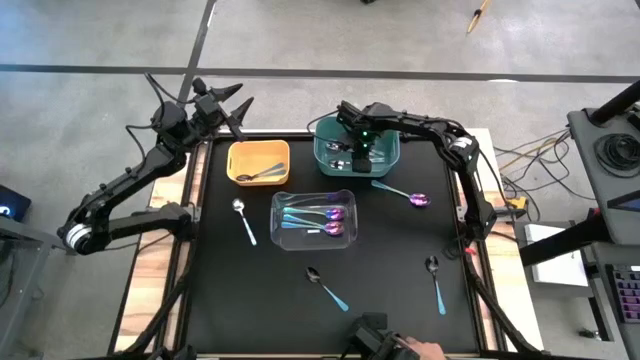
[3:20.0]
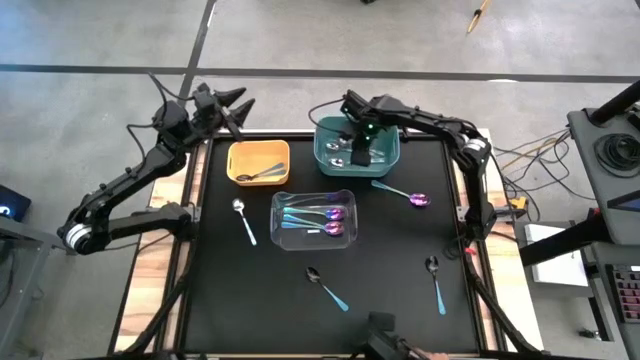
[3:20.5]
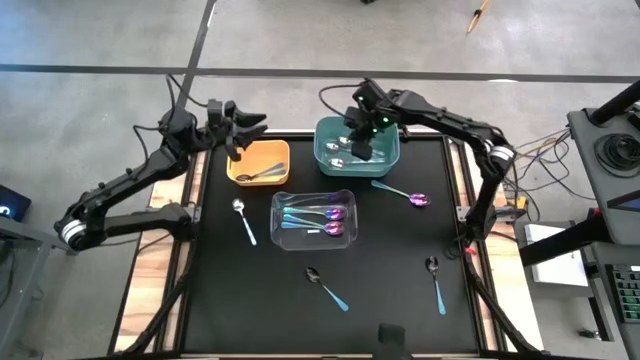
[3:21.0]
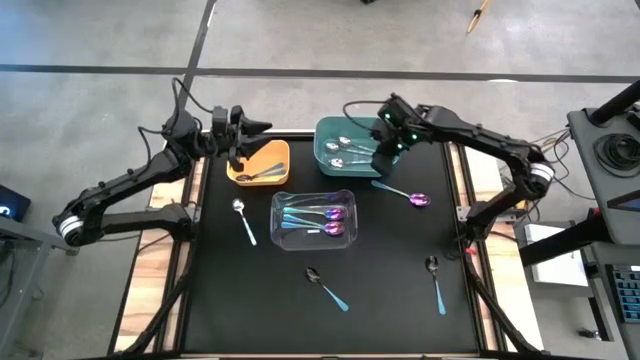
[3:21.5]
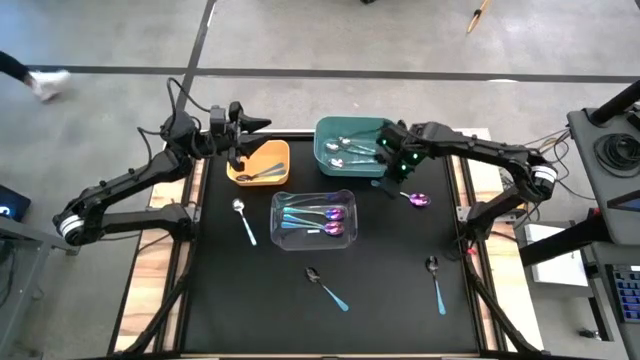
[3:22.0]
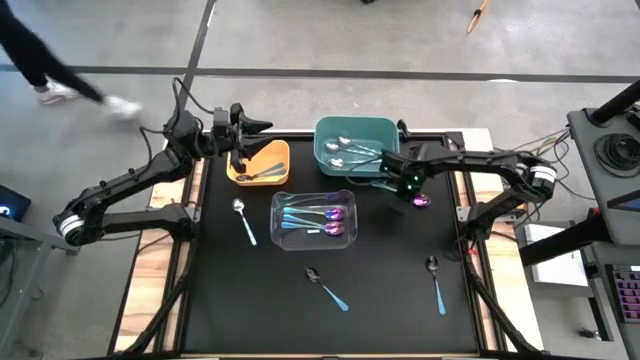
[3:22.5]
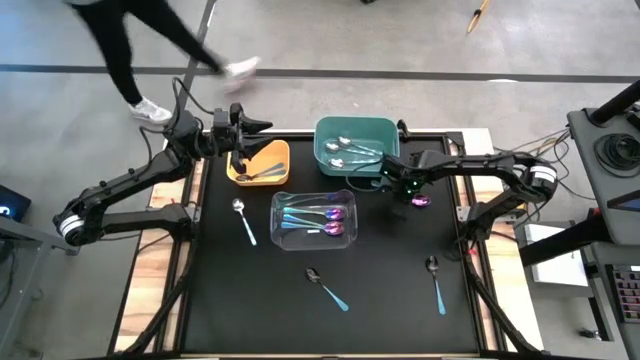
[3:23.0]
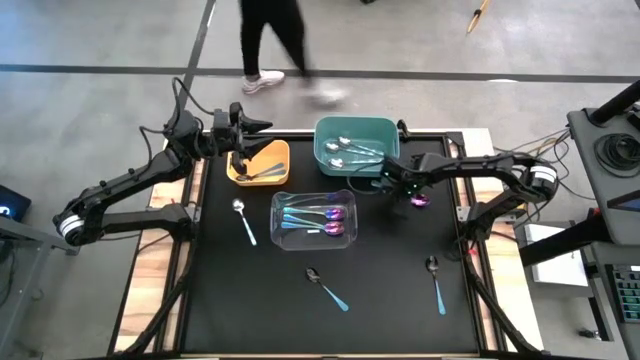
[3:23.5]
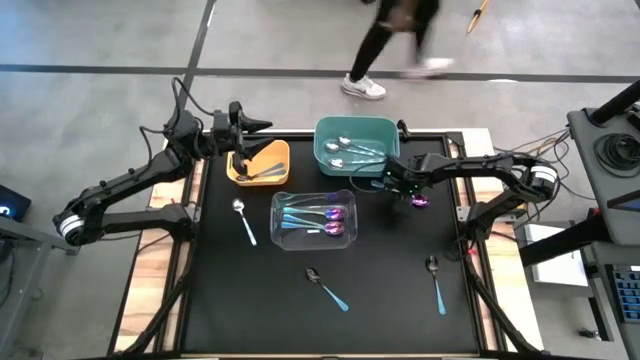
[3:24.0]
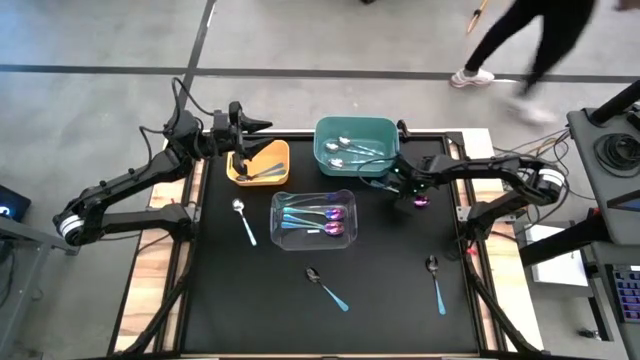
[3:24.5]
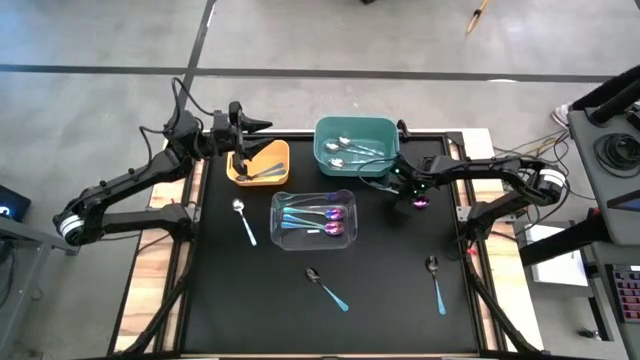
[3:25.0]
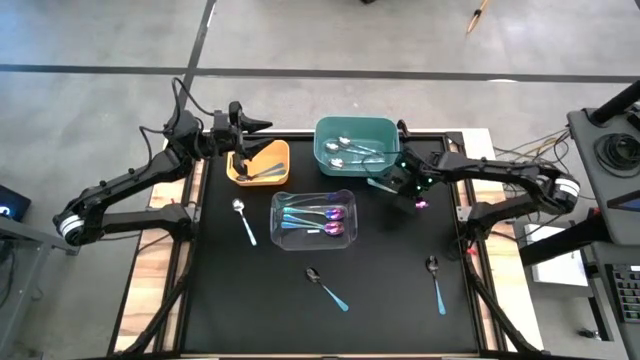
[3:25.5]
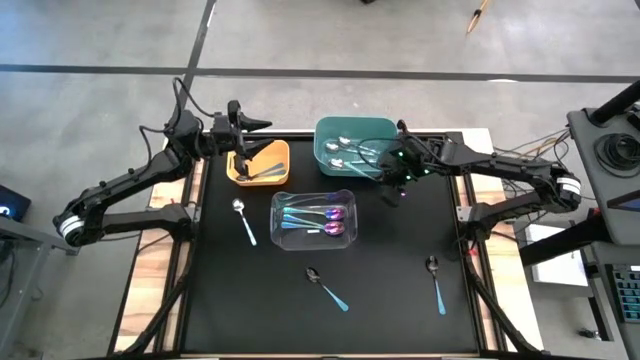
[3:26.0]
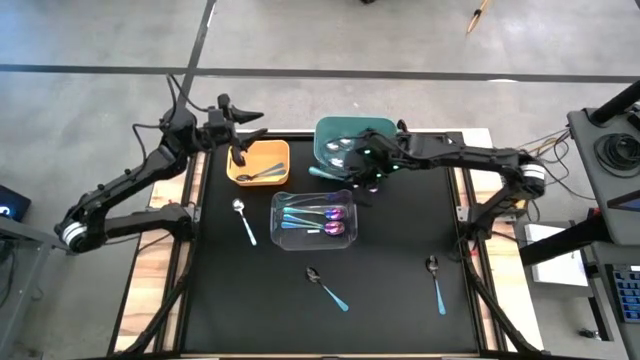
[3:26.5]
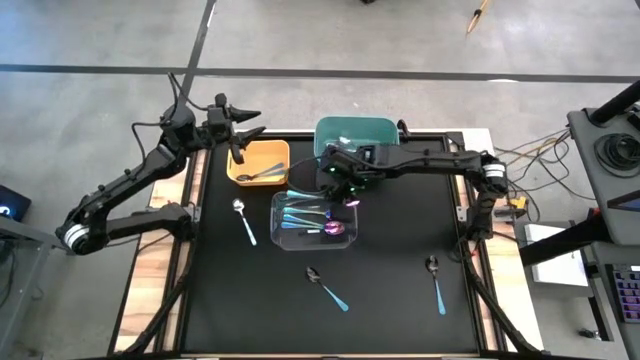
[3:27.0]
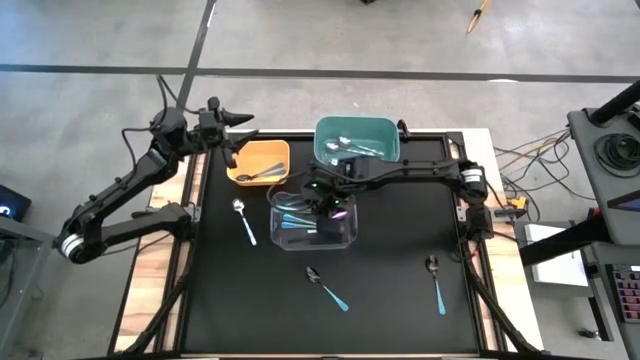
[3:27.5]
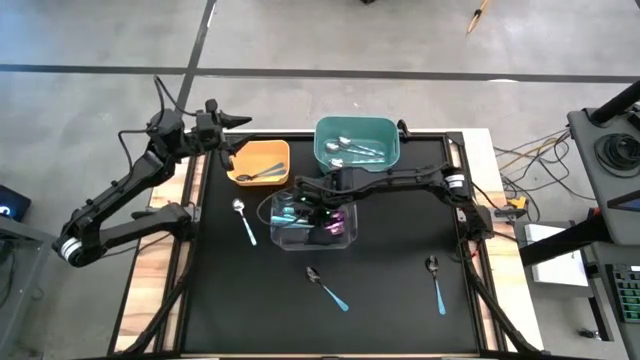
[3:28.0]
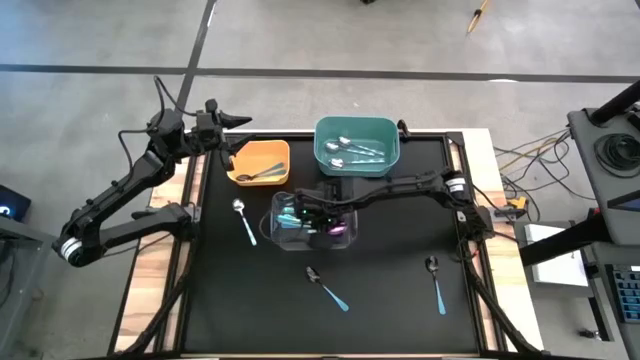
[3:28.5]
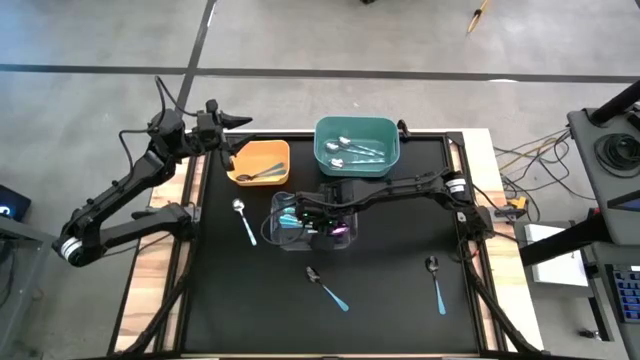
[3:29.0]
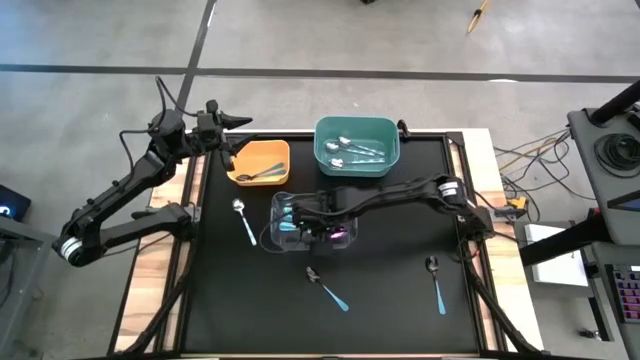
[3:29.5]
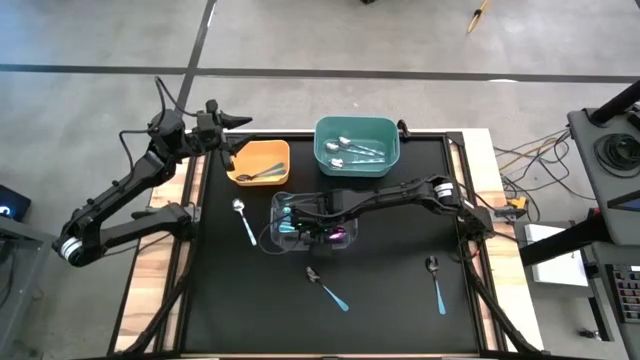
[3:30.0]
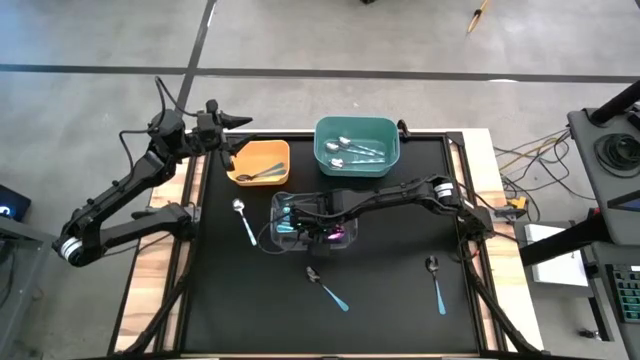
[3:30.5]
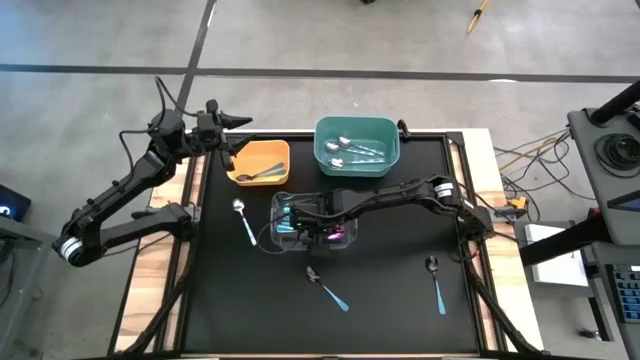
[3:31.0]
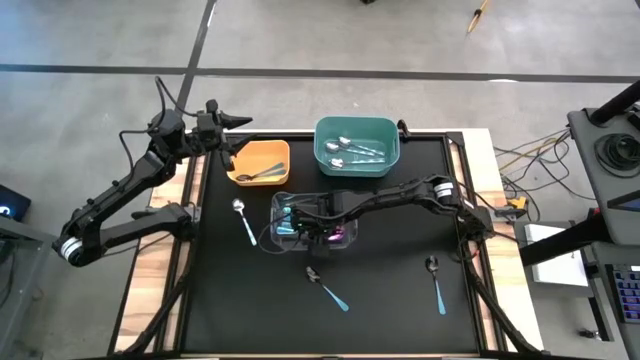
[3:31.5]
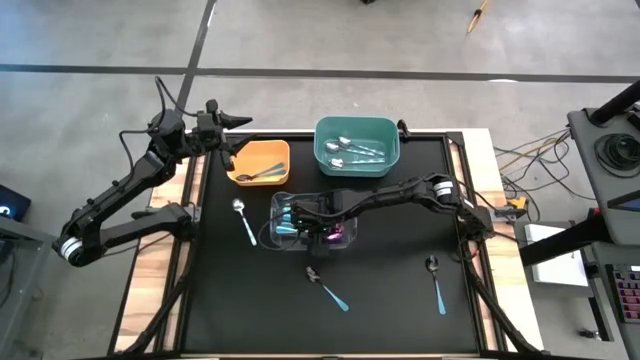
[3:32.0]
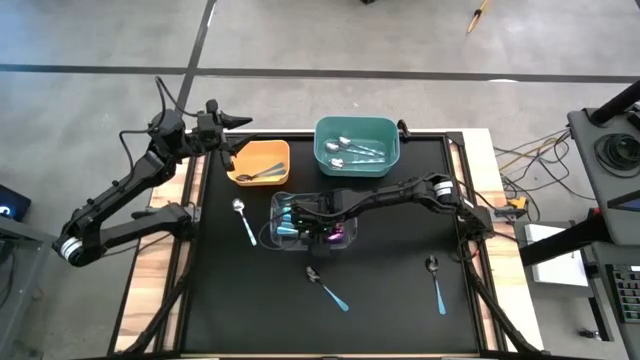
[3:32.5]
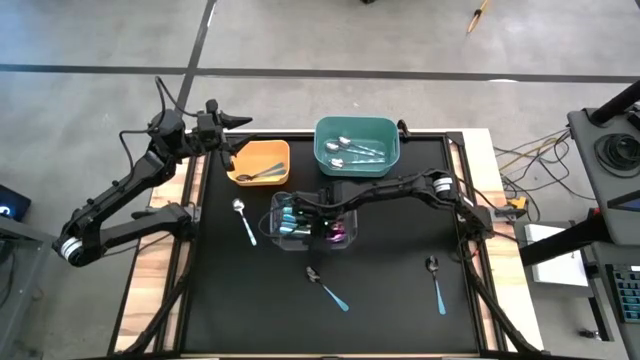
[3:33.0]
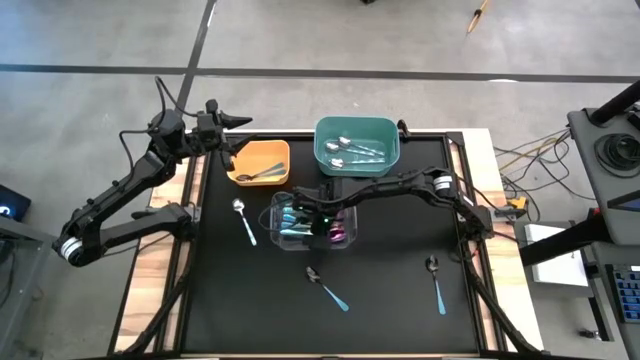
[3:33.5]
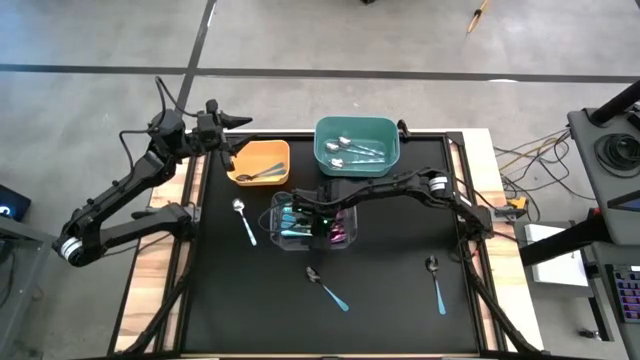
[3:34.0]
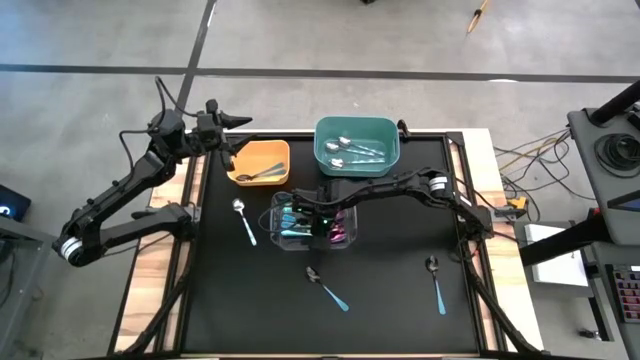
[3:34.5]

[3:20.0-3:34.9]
Task: Sort silverware by color (type)
Put the violet spoon into the transparent bin

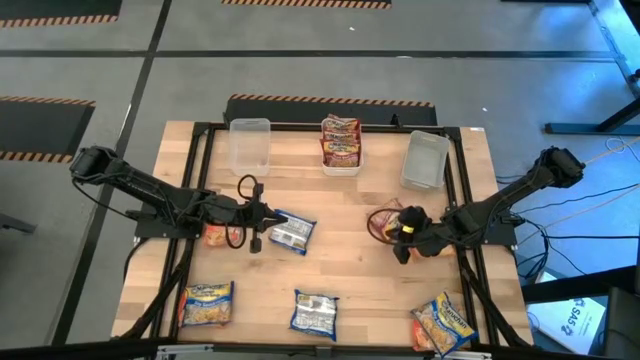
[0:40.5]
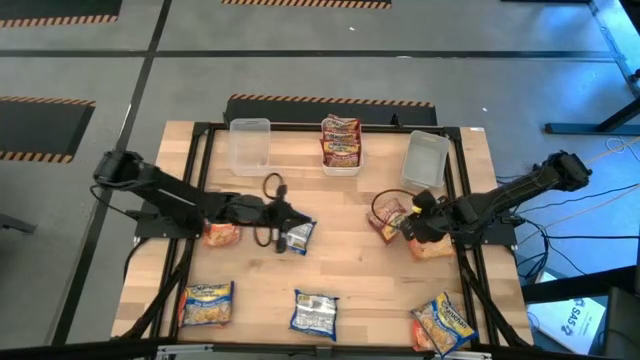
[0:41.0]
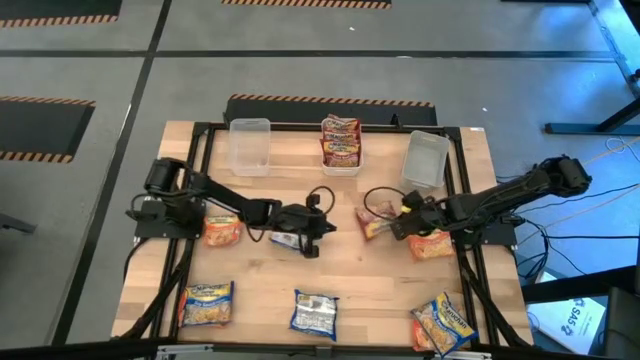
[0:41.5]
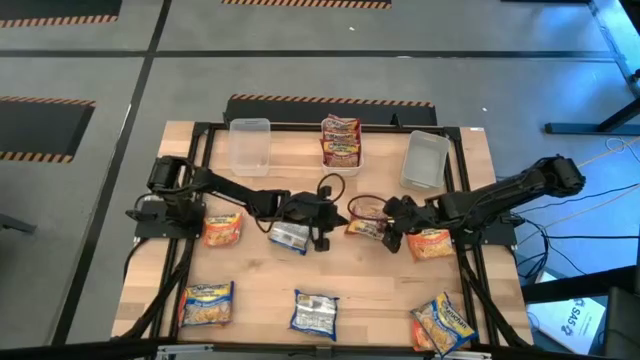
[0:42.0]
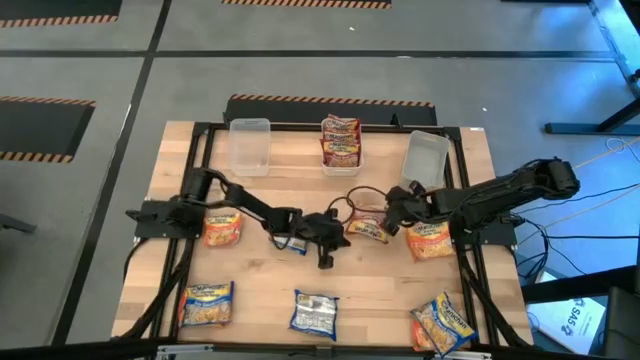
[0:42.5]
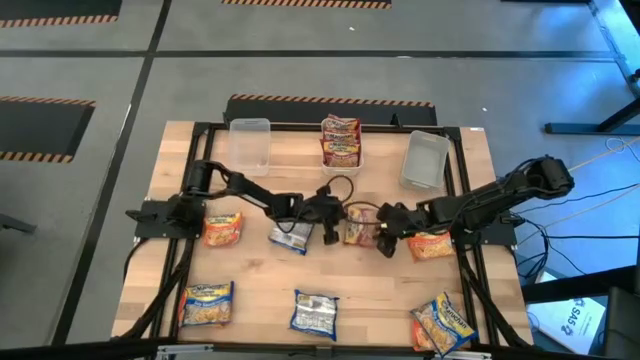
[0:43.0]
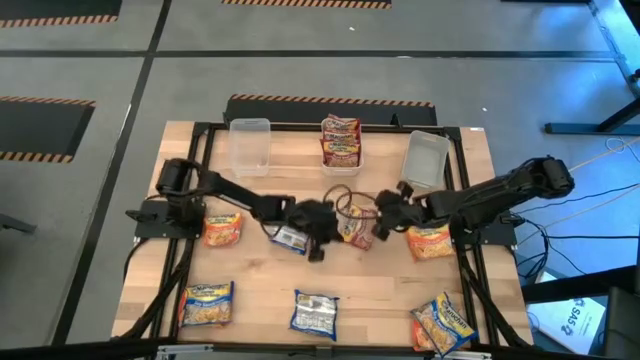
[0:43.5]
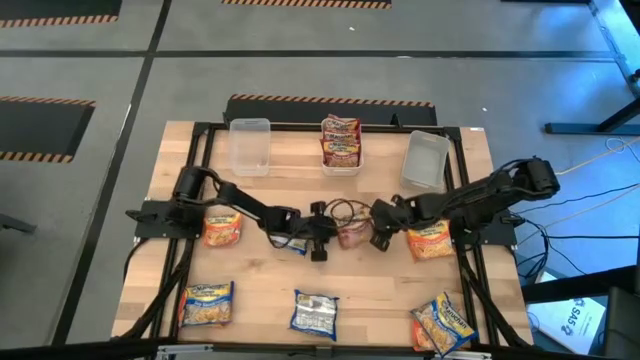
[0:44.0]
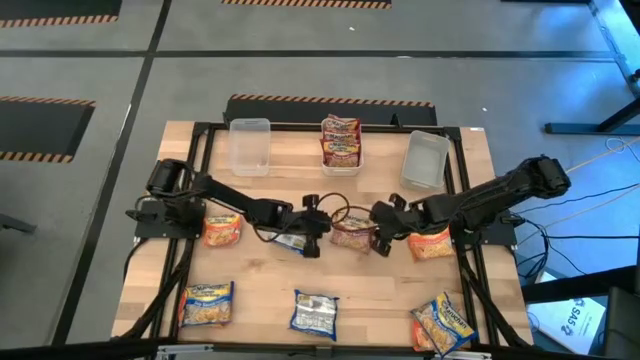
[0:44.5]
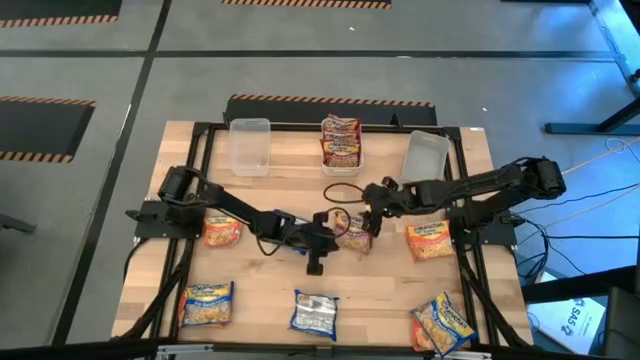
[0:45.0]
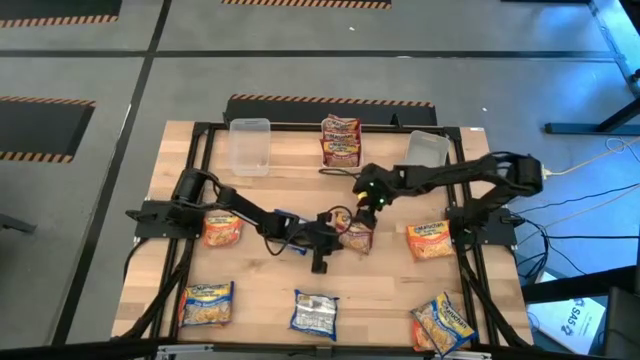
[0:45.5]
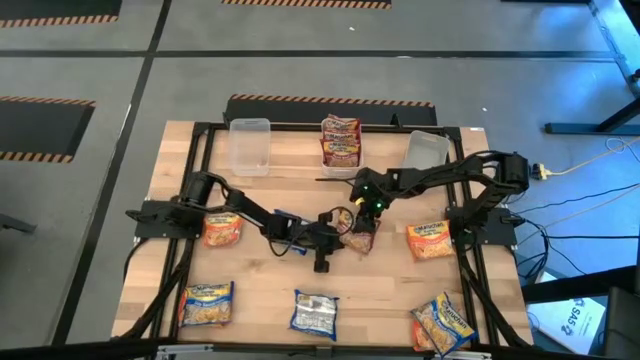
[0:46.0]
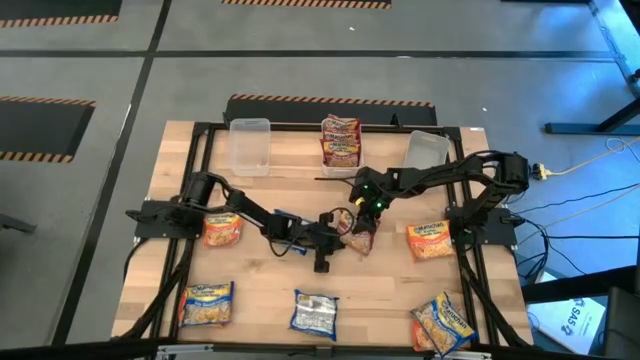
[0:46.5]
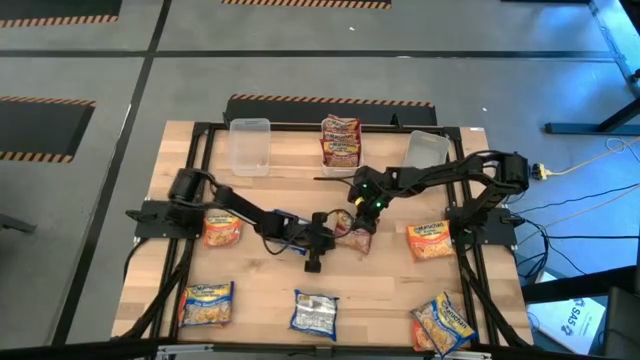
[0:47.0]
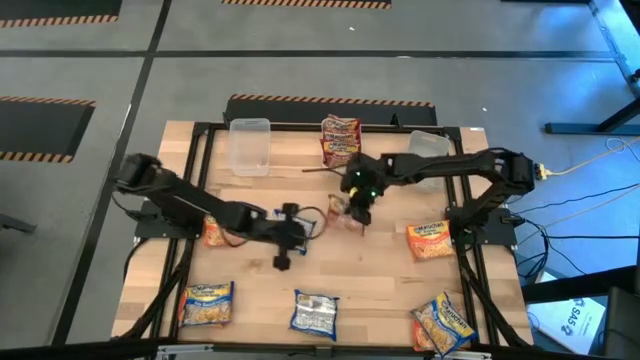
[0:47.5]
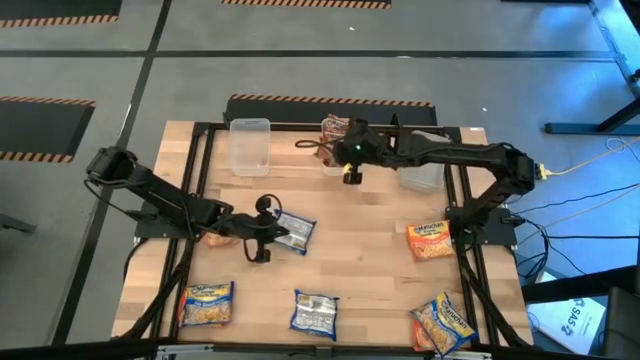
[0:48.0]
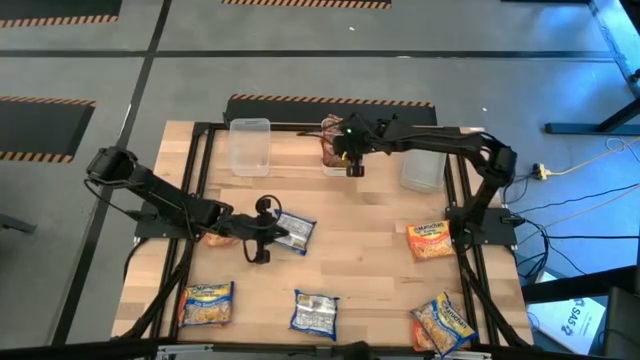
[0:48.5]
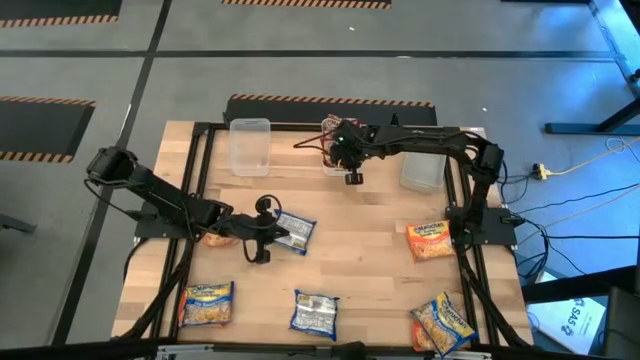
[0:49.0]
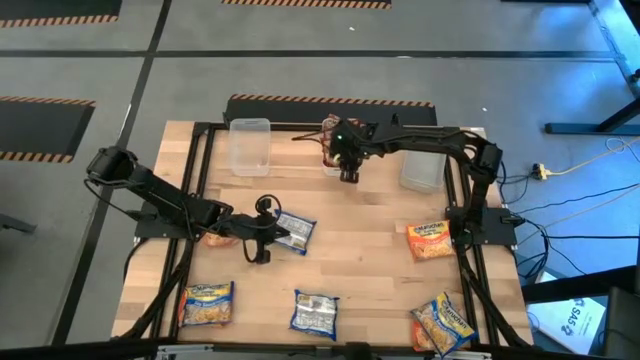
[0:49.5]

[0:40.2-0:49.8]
Task: Sort Maruchan noodles
Put the red noodle pack into the white bin
